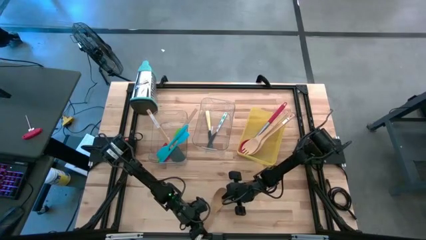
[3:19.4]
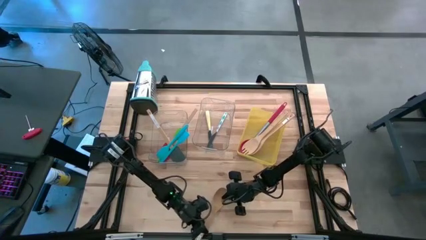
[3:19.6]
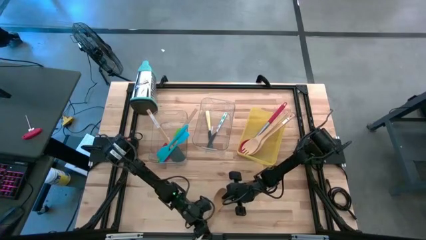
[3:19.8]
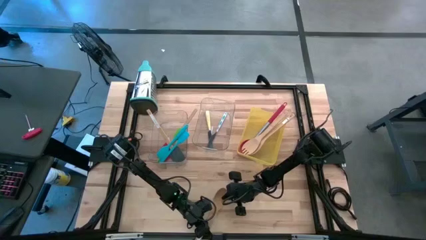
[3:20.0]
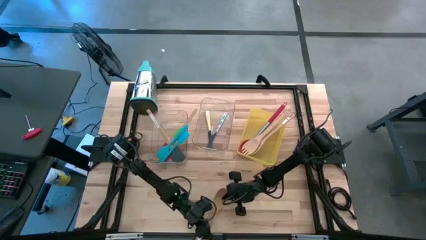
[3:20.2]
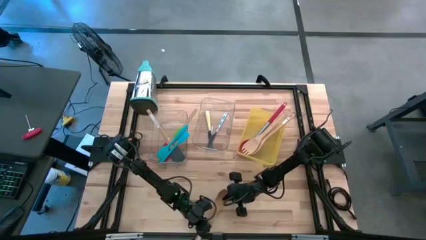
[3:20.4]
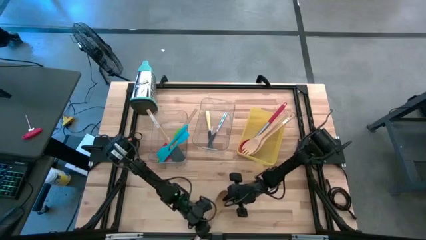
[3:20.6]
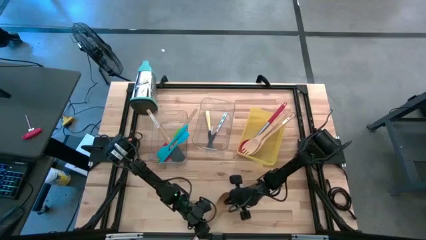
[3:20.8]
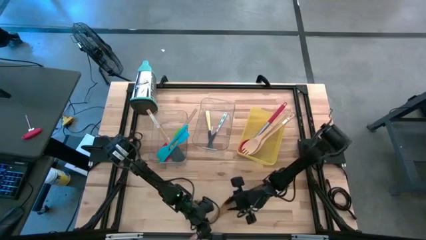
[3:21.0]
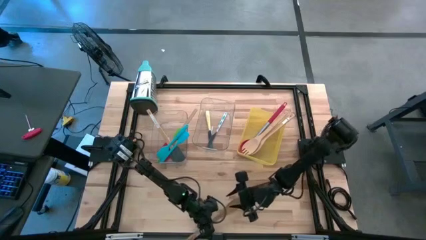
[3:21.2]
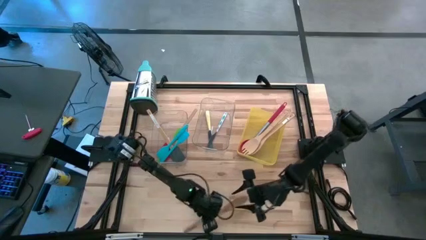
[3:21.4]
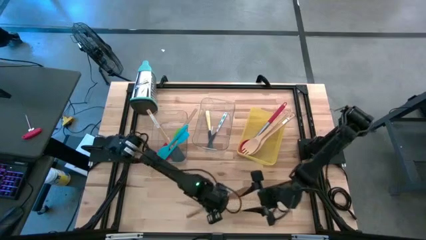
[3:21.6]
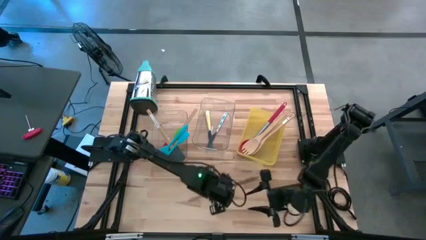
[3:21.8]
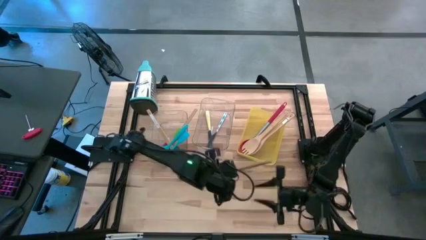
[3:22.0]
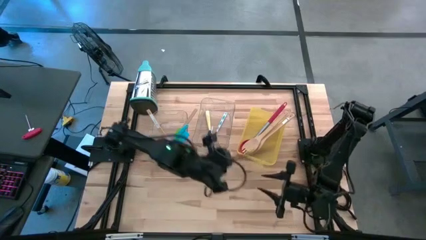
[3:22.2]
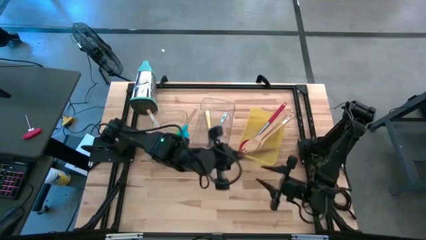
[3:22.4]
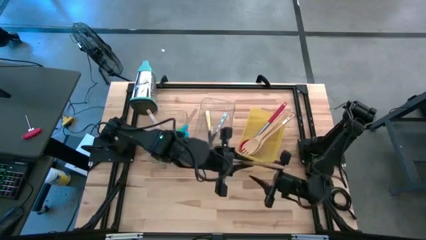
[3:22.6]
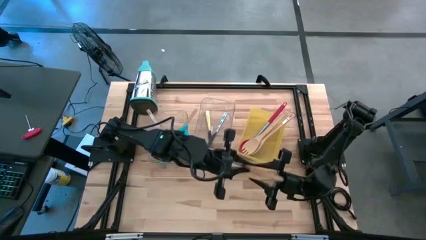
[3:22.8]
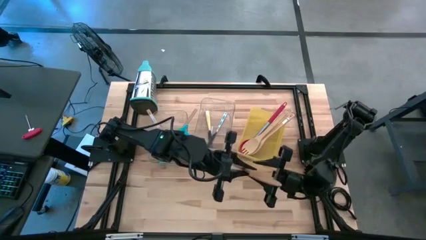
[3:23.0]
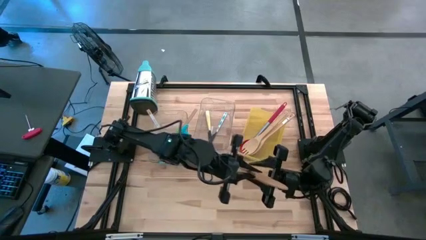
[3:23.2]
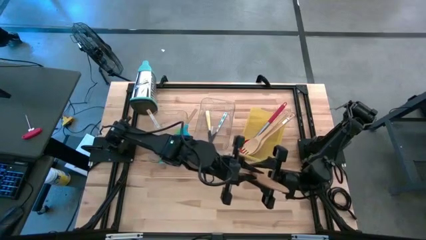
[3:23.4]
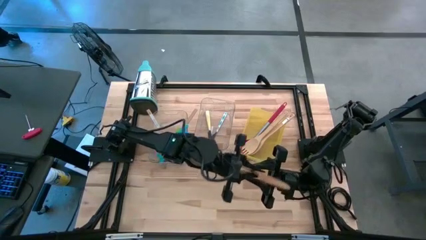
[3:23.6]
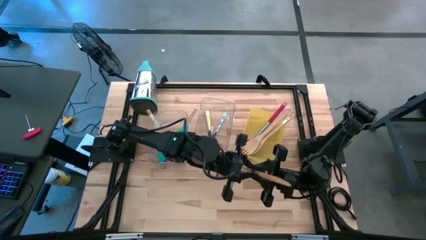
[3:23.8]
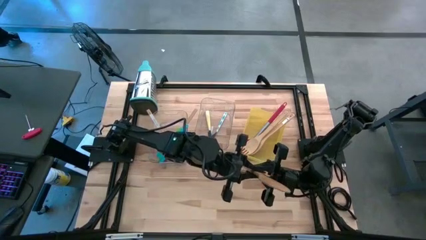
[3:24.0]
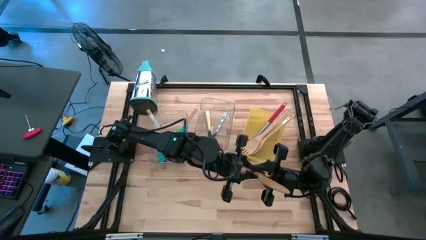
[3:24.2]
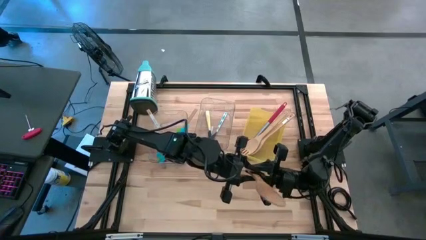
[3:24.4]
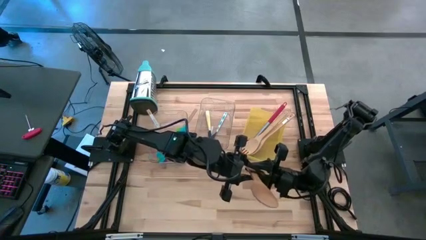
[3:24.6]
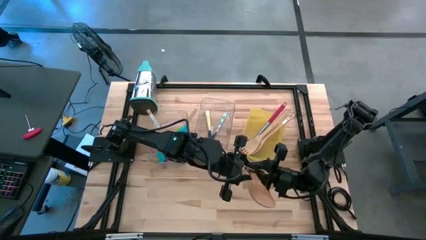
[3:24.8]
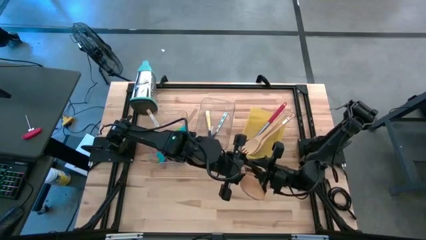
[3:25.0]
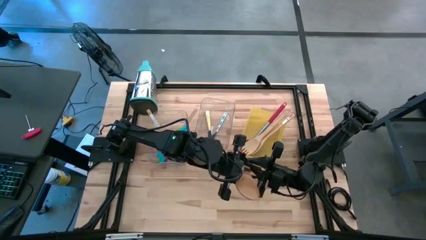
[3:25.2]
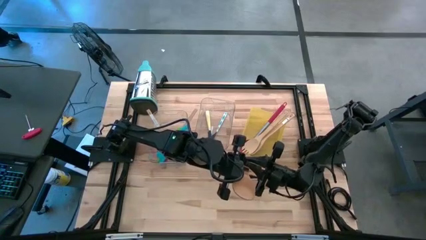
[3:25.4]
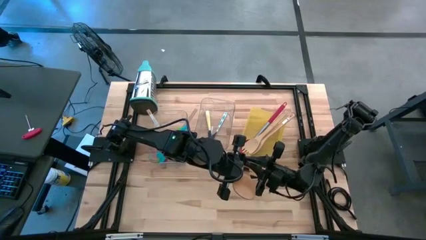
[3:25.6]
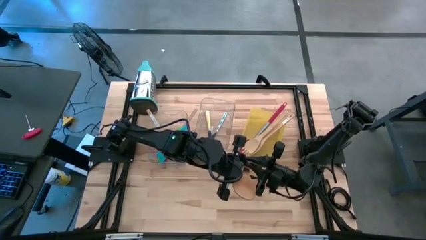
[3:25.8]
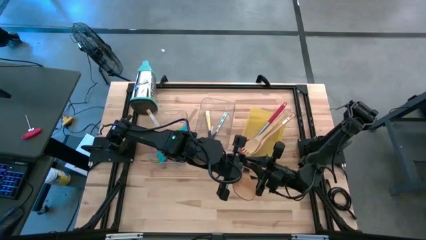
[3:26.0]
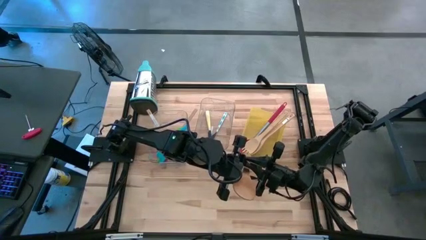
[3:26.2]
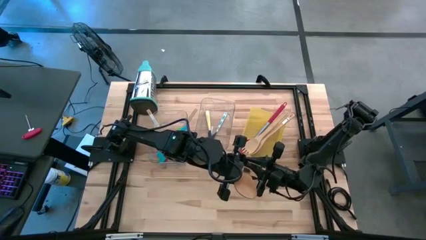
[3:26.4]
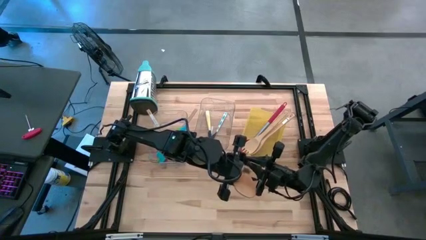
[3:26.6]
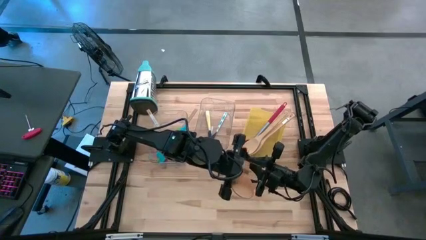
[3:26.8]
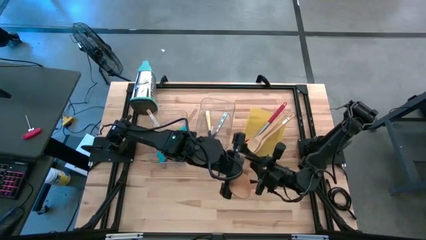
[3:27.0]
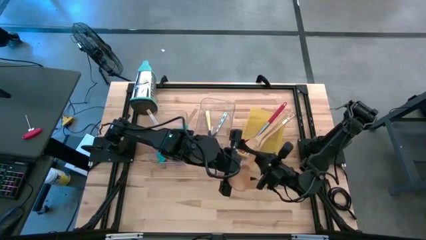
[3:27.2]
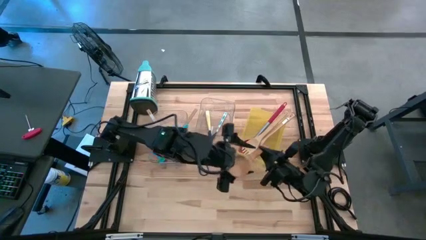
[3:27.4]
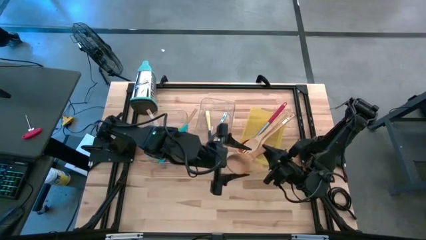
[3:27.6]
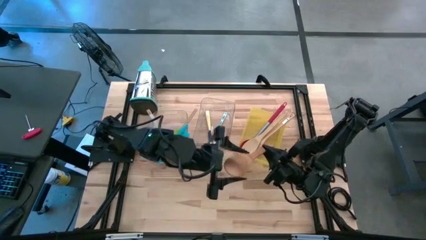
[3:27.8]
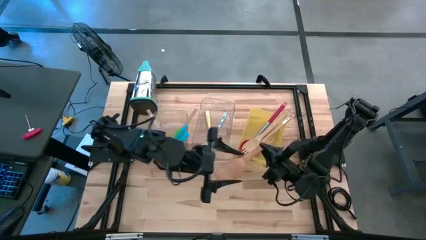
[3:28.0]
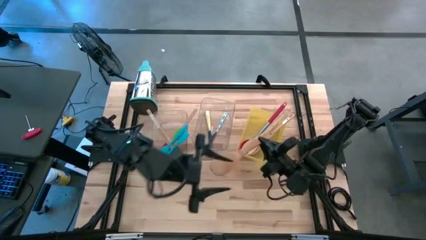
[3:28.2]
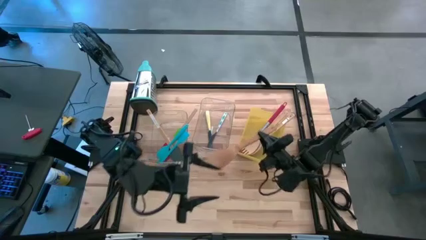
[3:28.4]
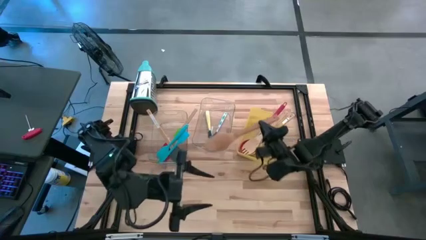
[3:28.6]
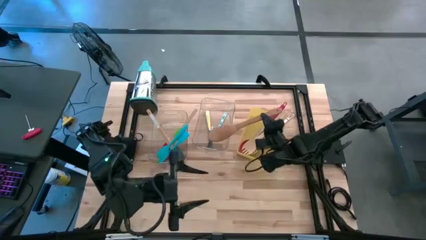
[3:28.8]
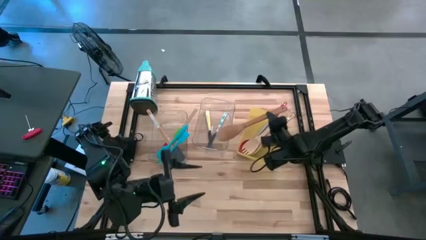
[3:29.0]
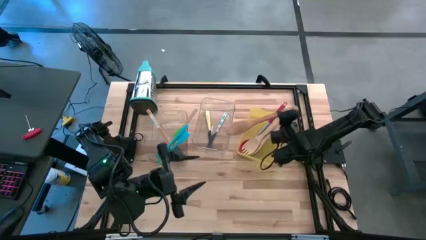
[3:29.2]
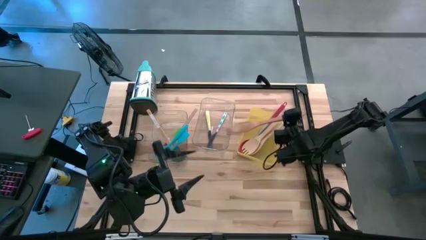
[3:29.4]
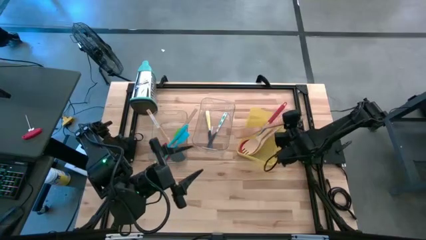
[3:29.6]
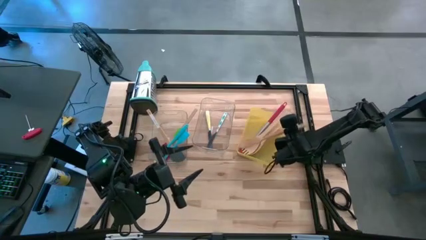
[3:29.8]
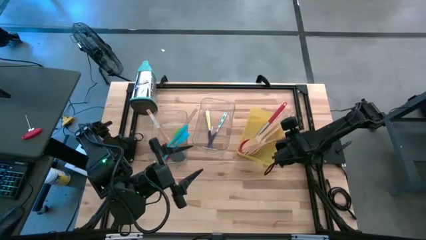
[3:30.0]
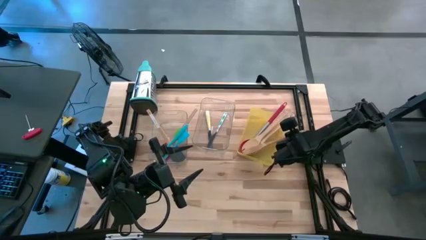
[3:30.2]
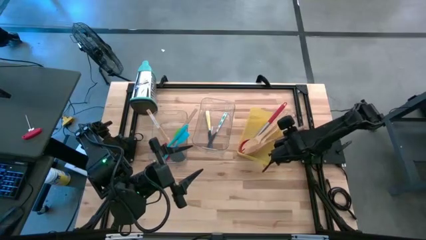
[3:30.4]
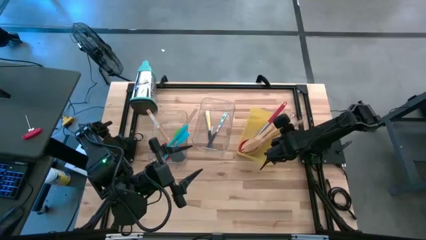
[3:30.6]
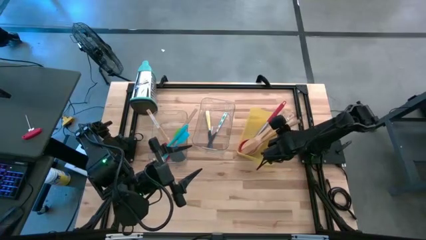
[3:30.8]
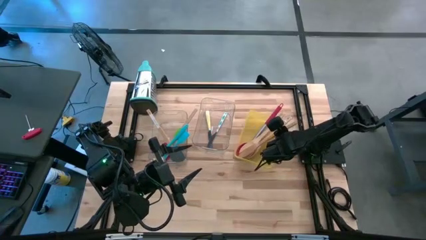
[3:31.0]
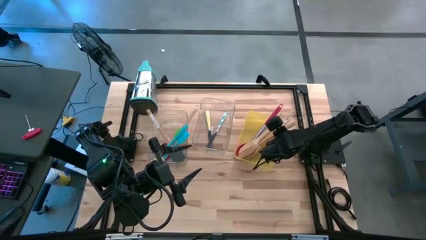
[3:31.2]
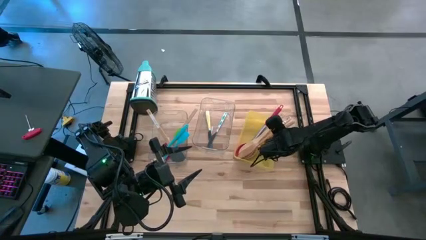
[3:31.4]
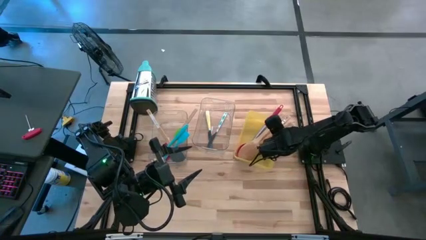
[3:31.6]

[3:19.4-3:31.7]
Task: Pick & Place Kitchen Items
Put the brown serving spoon into the yellow bin
